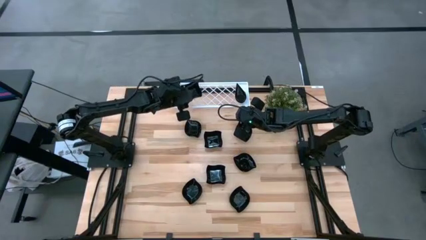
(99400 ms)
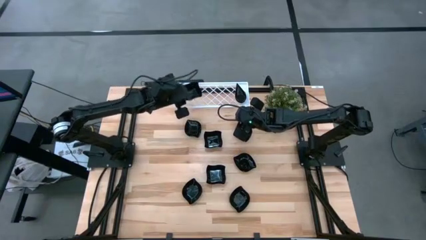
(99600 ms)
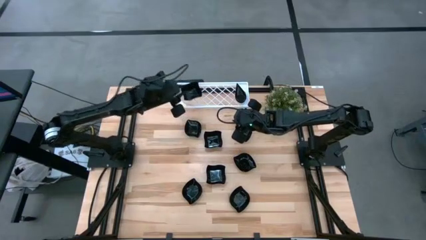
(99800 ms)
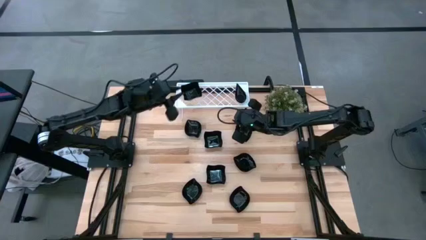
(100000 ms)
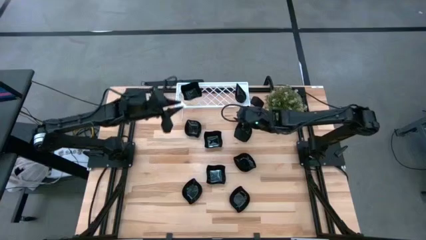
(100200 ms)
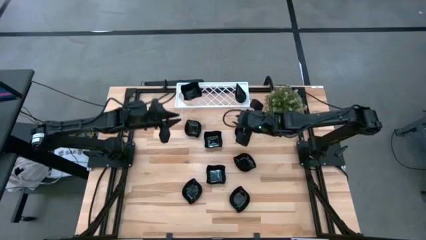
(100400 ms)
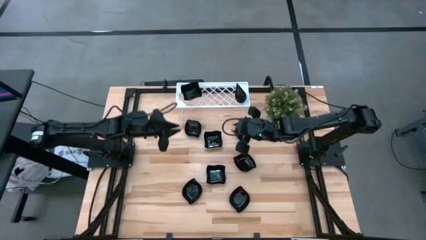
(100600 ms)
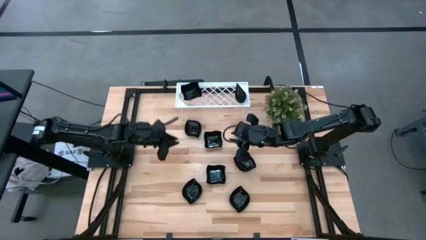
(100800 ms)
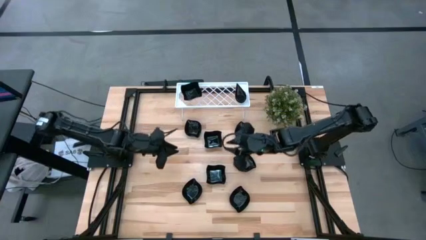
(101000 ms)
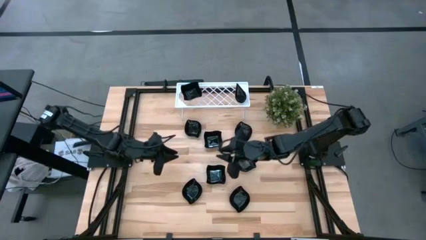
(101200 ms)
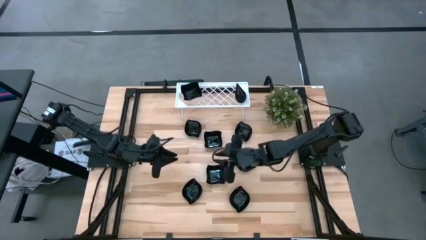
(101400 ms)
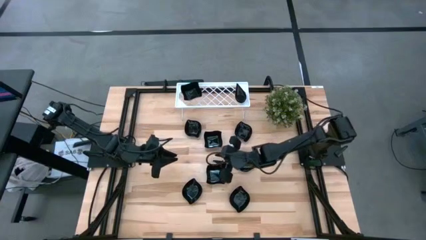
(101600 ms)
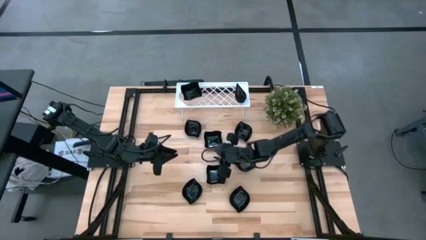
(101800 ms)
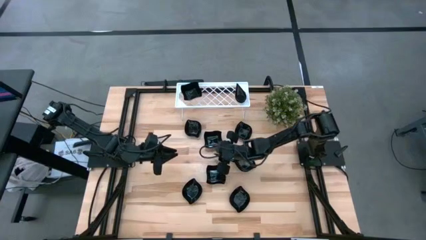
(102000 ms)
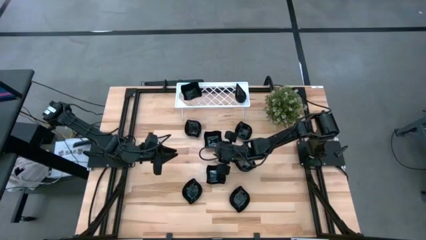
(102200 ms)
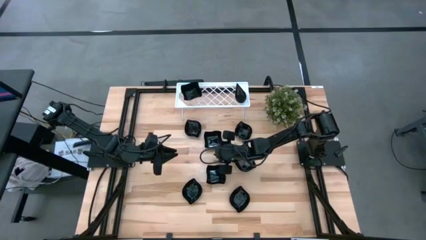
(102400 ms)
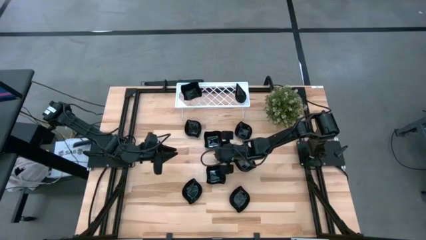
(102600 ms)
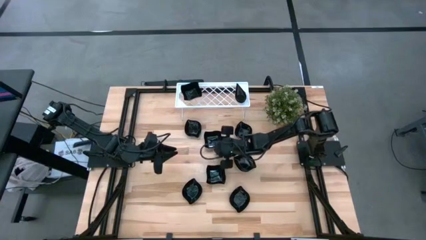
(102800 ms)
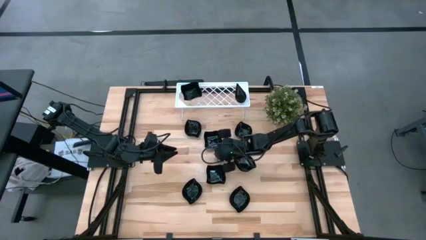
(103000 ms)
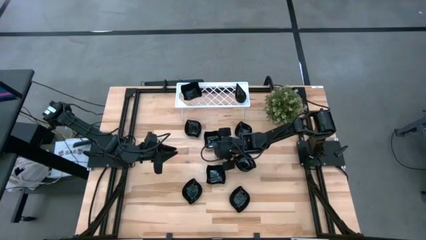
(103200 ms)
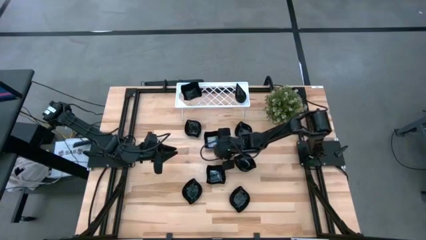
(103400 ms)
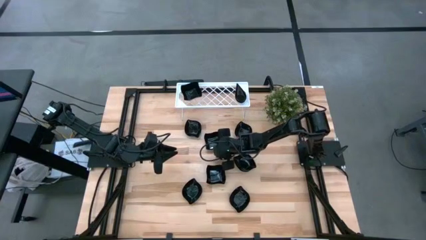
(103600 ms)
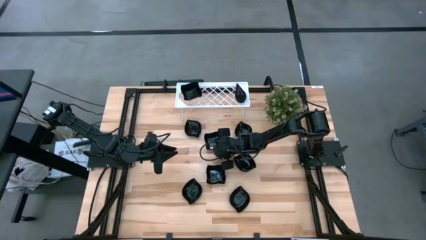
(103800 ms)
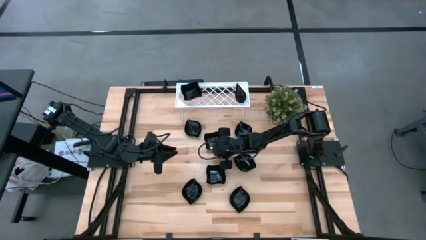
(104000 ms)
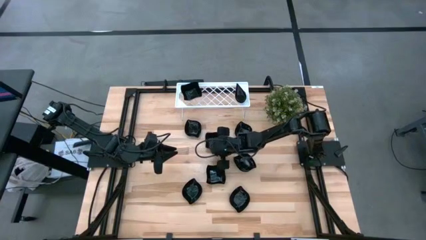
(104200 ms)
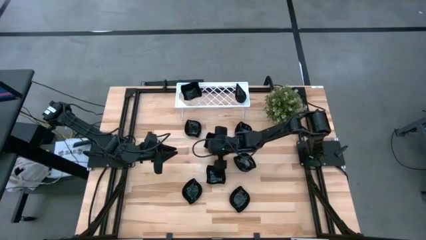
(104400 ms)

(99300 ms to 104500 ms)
Task: Pick & Place Mini shaped plates
Stack the distorted square plate on top of the distorted square plate on the shelf

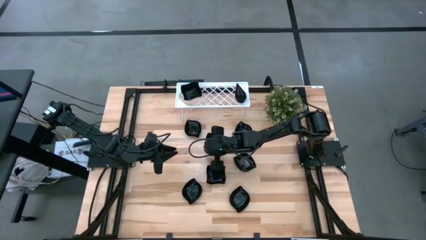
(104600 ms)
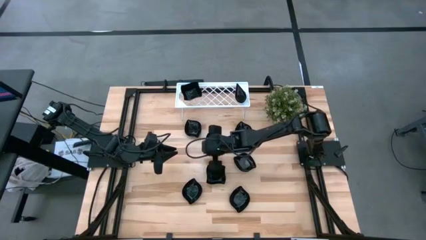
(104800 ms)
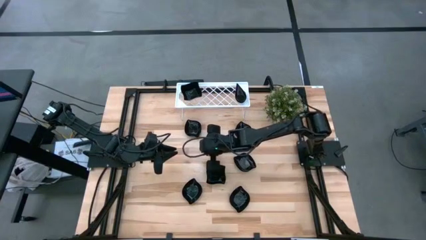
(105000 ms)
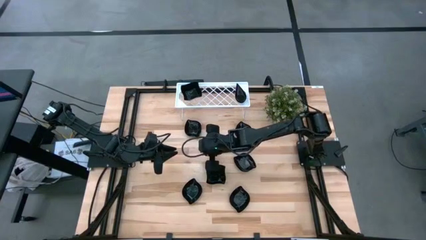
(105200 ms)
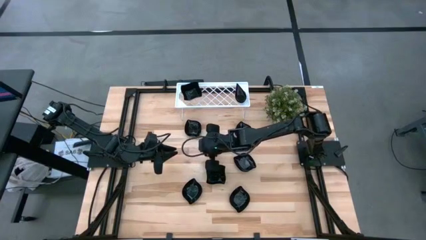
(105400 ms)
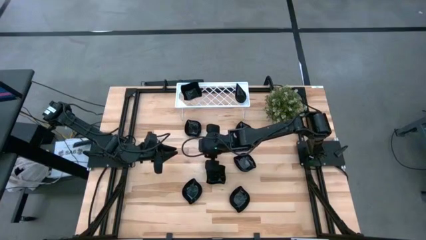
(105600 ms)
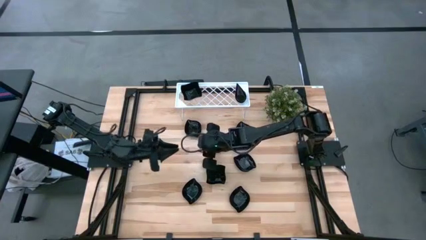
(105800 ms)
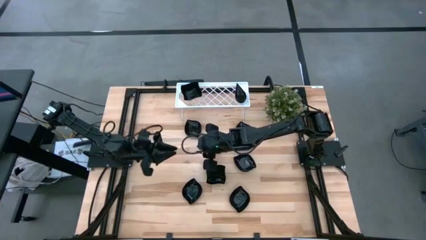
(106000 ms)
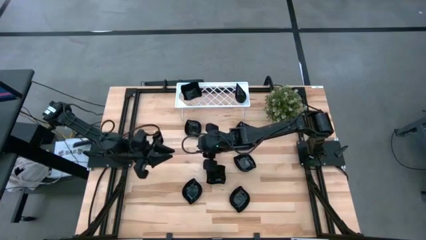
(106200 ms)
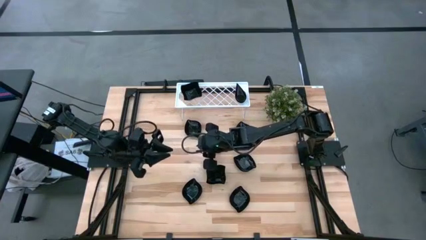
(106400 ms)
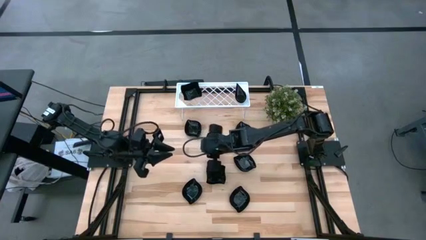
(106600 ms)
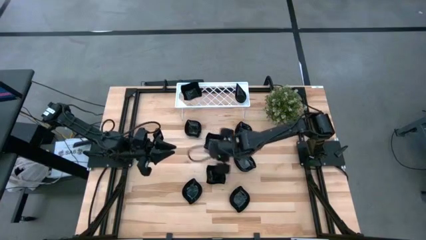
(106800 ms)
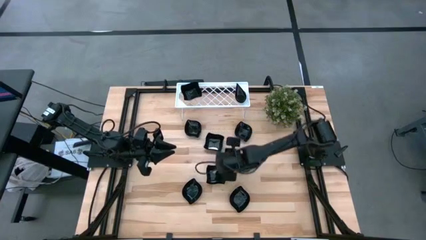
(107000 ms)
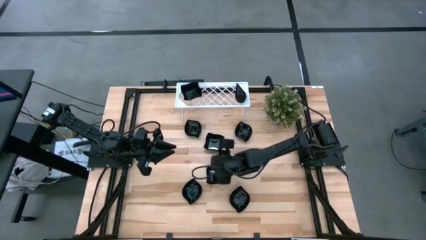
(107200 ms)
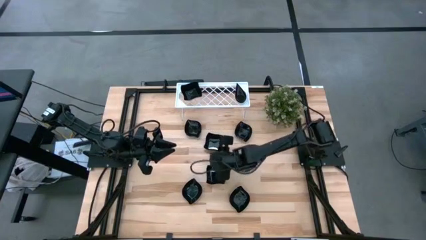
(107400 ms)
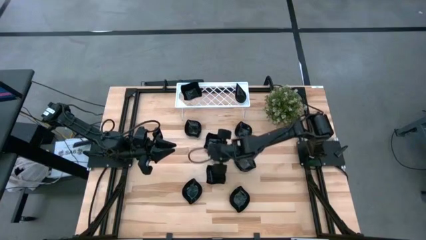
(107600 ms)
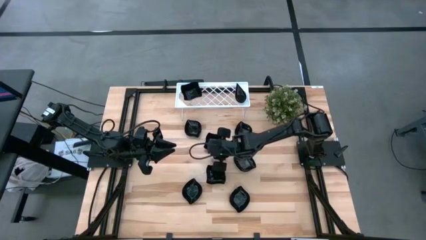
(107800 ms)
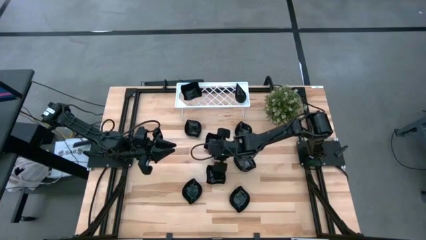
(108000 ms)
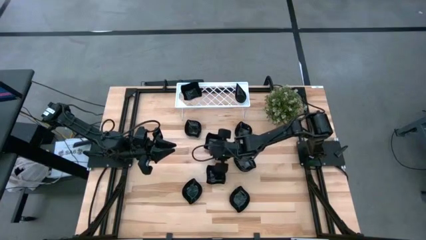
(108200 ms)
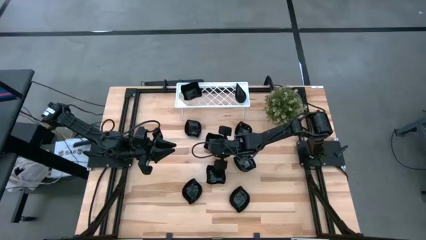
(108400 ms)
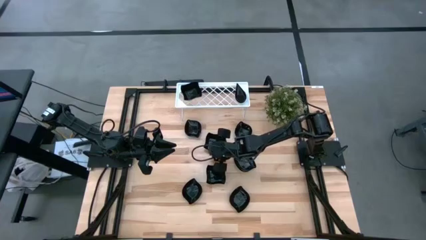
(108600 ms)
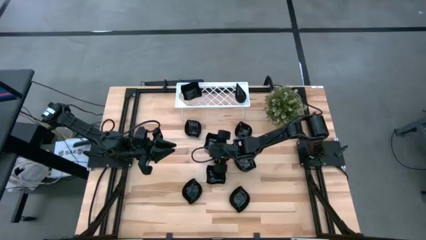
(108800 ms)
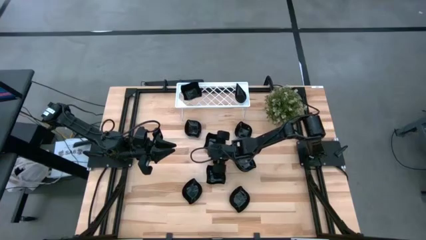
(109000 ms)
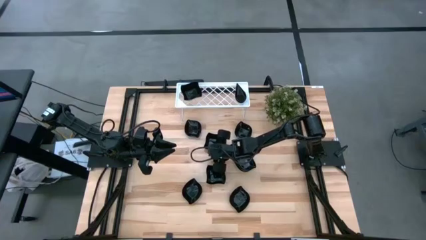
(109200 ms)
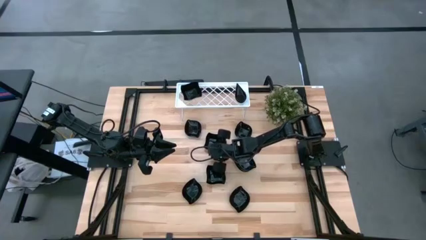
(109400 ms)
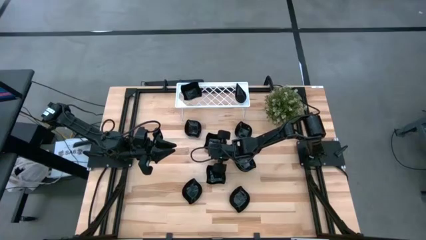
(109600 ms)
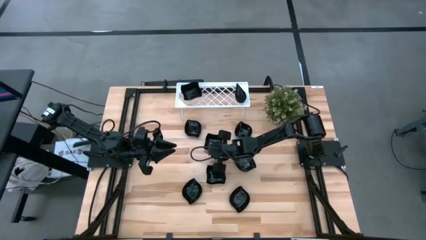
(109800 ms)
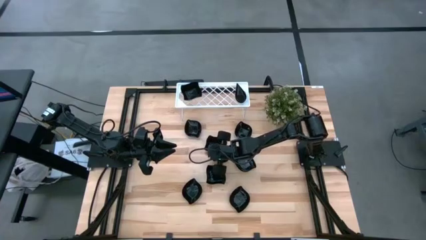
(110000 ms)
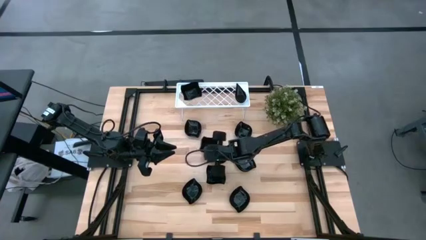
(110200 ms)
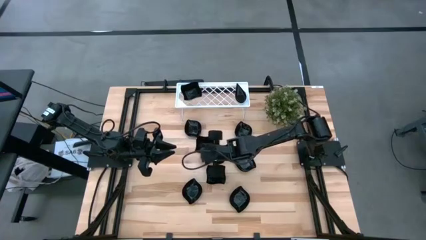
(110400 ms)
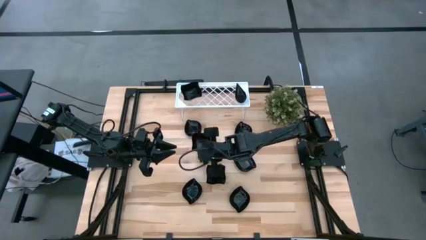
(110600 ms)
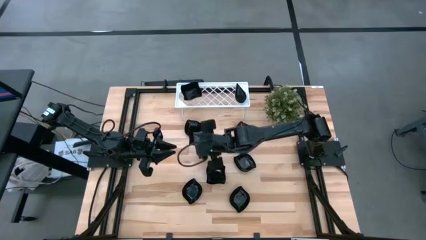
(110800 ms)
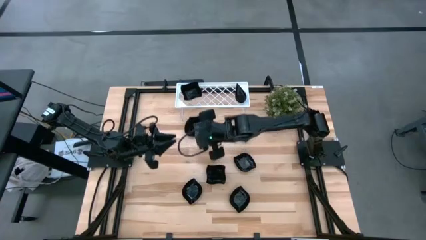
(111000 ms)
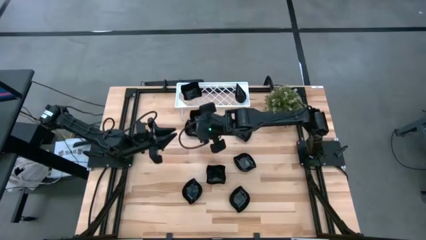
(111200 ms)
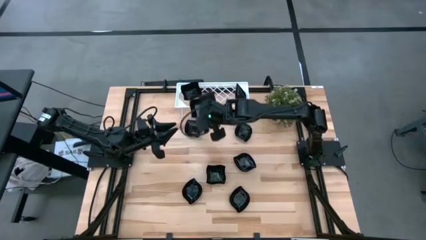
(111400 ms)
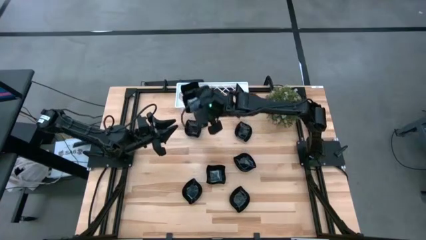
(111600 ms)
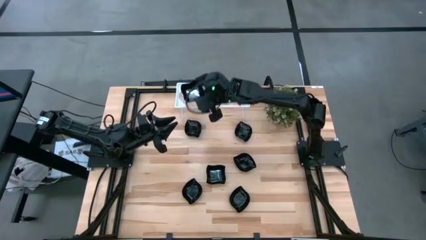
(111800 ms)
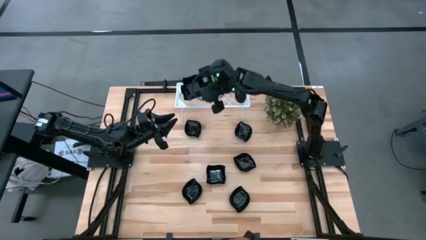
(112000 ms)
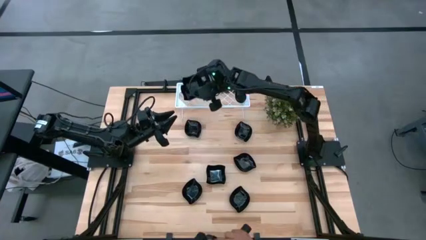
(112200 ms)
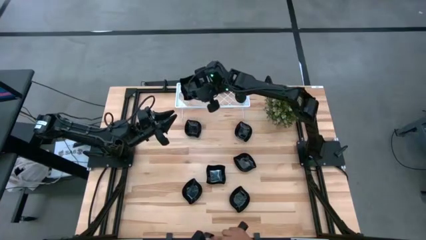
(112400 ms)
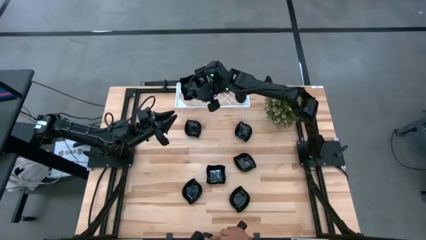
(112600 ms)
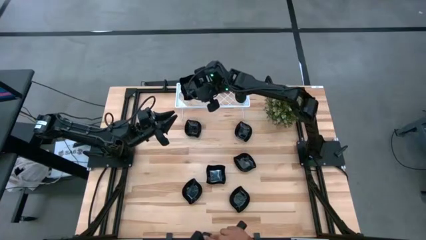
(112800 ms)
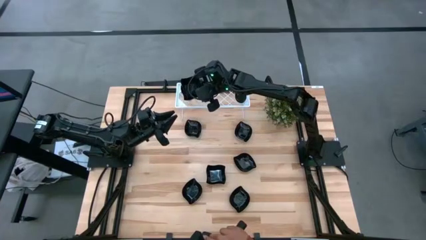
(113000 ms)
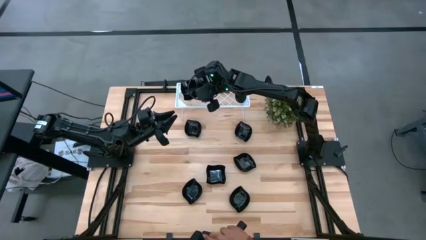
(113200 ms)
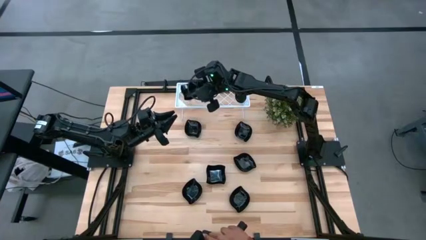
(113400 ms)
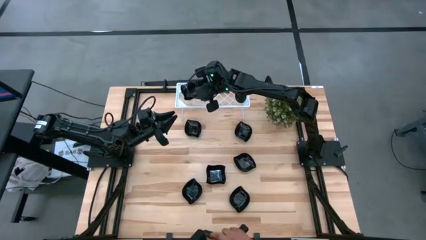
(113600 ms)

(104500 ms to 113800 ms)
Stack the distorted square plate on top of the distorted square plate on the shelf
